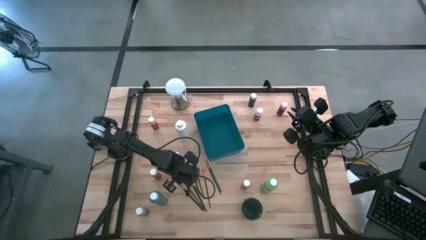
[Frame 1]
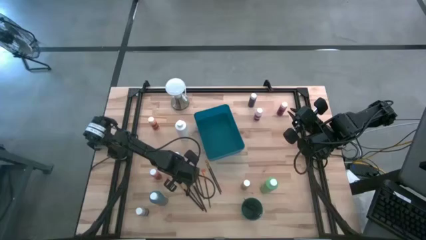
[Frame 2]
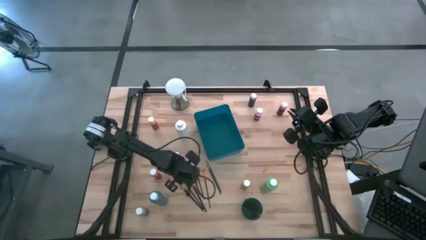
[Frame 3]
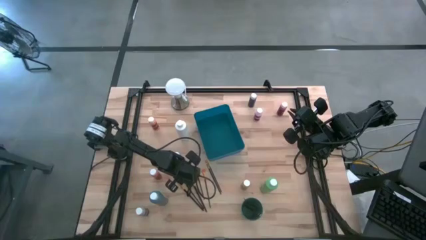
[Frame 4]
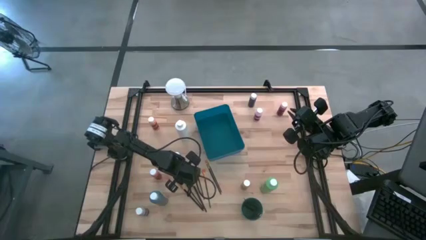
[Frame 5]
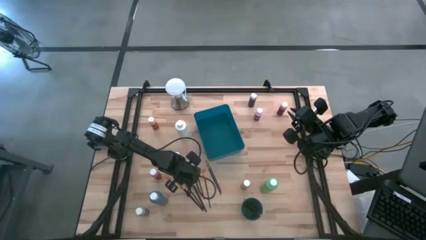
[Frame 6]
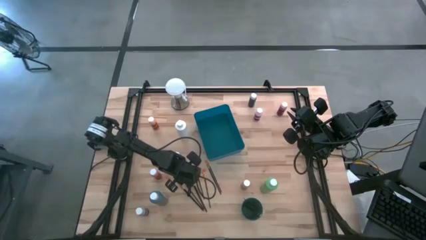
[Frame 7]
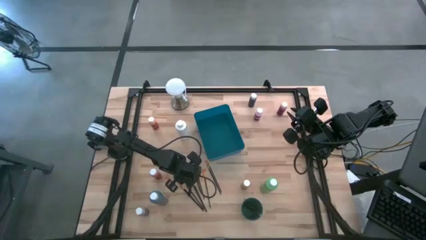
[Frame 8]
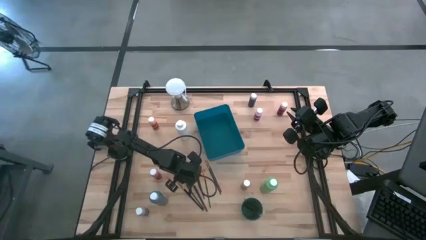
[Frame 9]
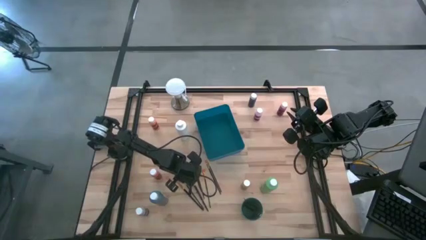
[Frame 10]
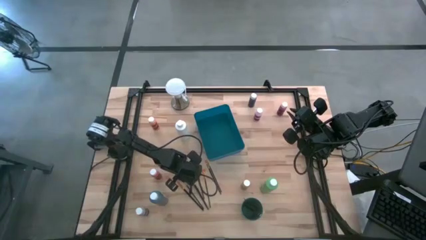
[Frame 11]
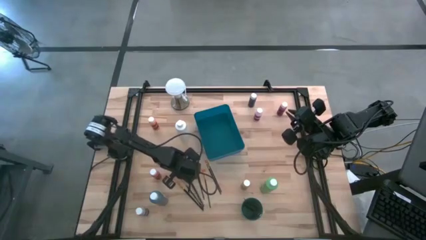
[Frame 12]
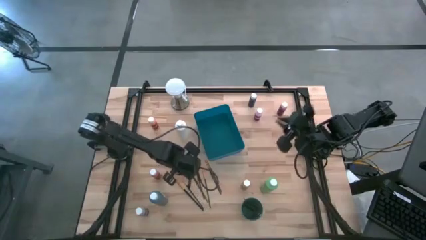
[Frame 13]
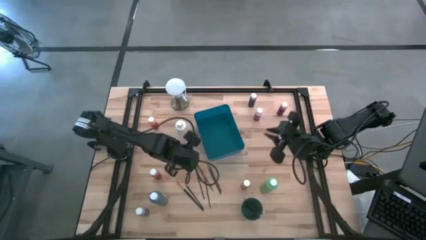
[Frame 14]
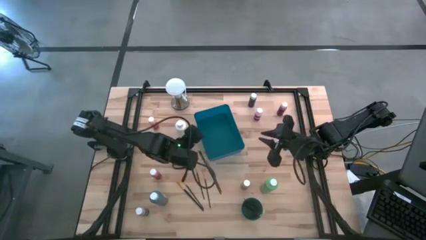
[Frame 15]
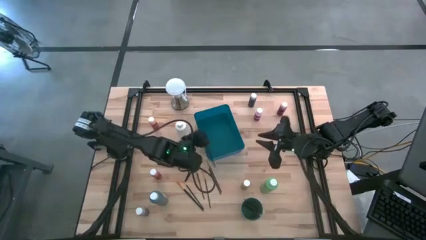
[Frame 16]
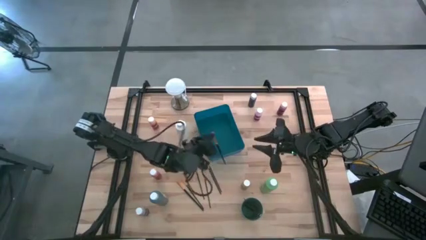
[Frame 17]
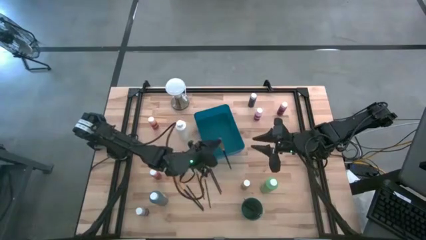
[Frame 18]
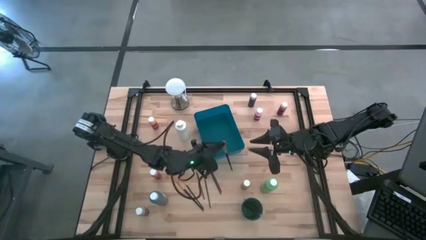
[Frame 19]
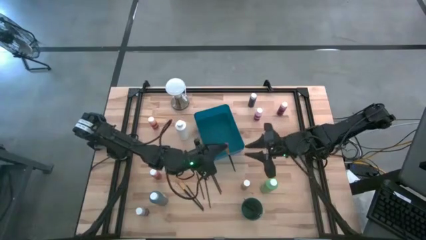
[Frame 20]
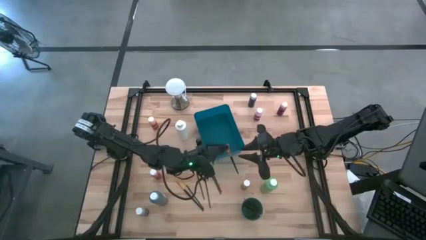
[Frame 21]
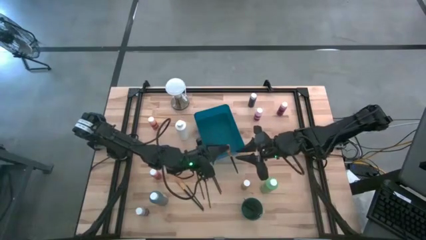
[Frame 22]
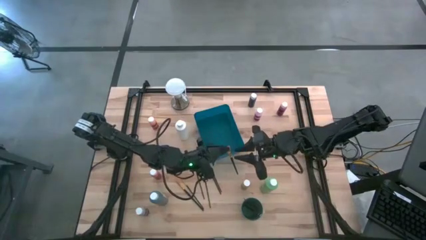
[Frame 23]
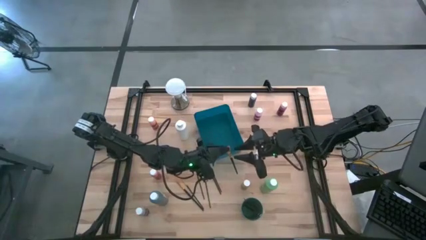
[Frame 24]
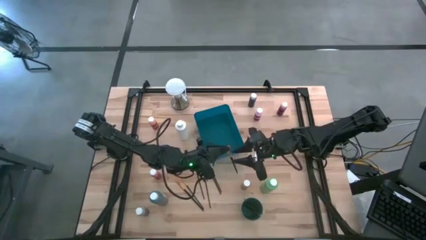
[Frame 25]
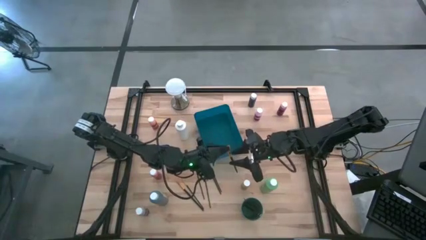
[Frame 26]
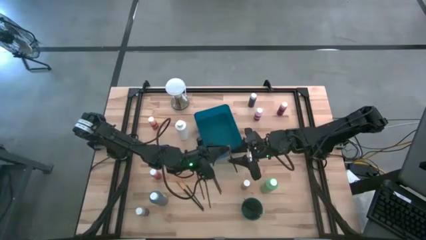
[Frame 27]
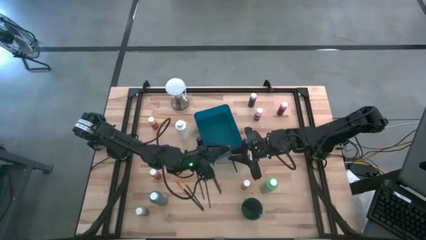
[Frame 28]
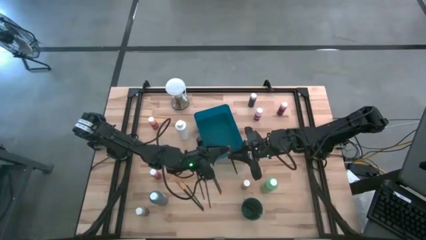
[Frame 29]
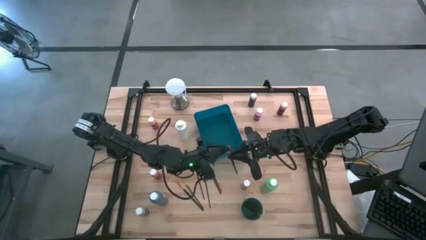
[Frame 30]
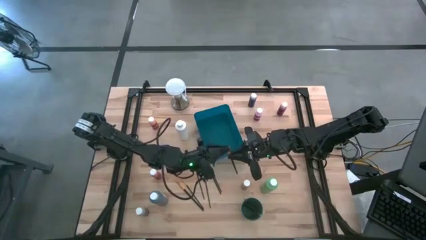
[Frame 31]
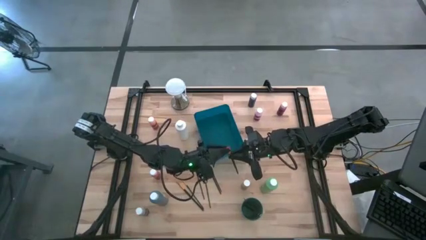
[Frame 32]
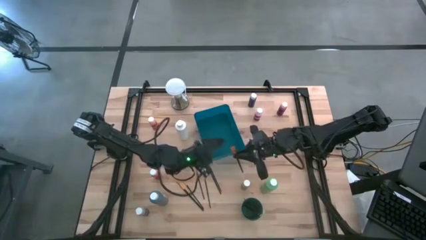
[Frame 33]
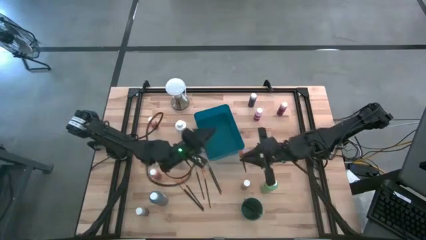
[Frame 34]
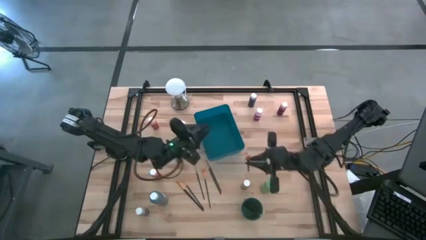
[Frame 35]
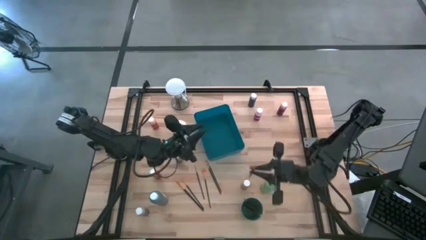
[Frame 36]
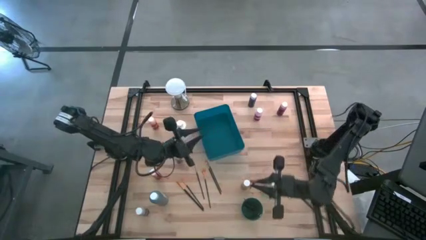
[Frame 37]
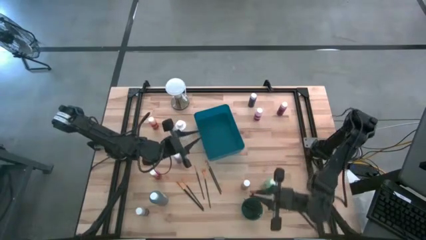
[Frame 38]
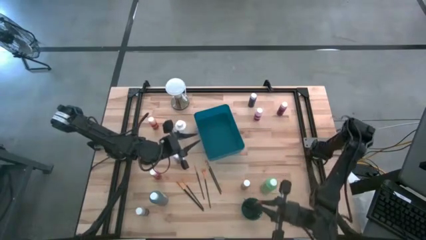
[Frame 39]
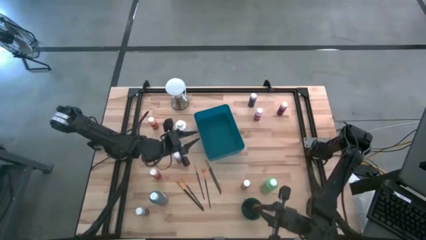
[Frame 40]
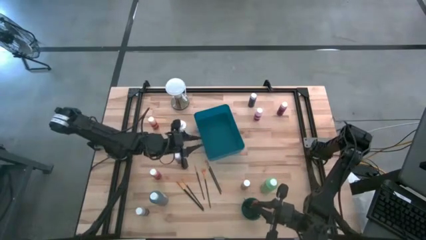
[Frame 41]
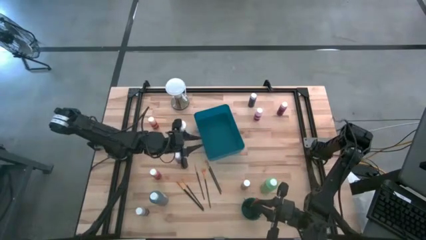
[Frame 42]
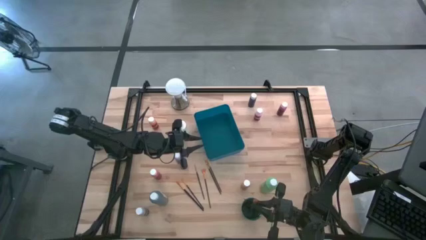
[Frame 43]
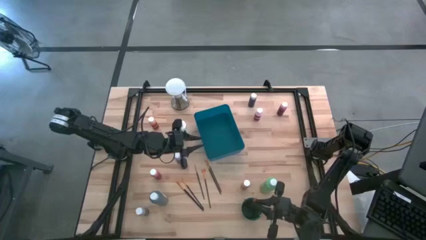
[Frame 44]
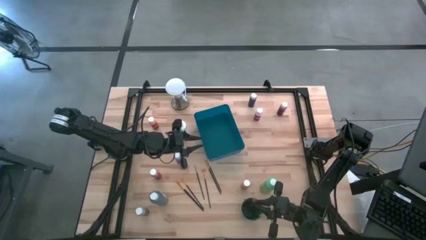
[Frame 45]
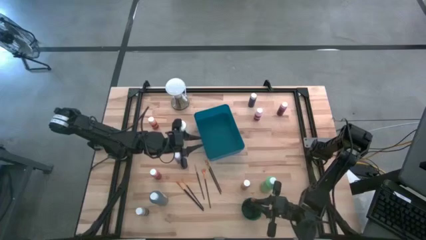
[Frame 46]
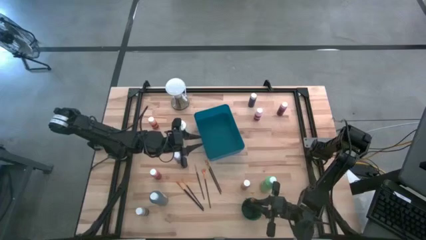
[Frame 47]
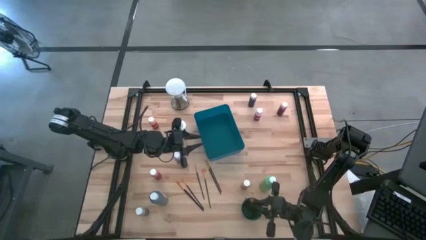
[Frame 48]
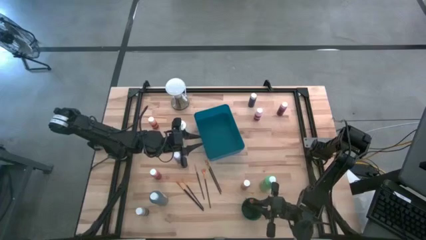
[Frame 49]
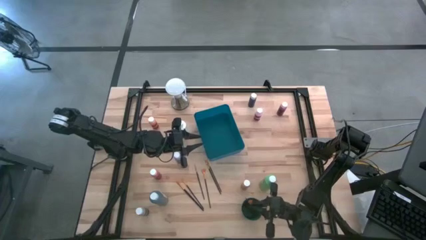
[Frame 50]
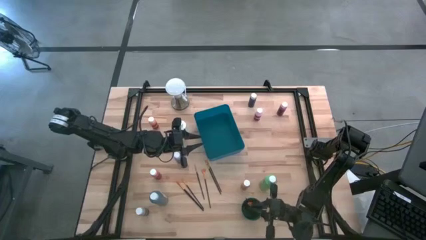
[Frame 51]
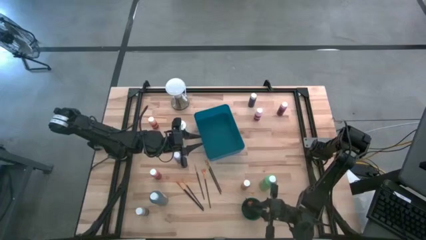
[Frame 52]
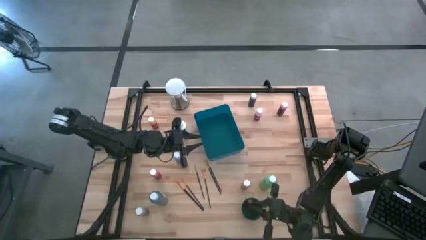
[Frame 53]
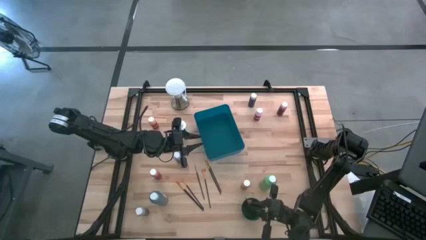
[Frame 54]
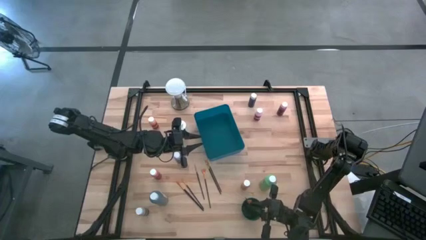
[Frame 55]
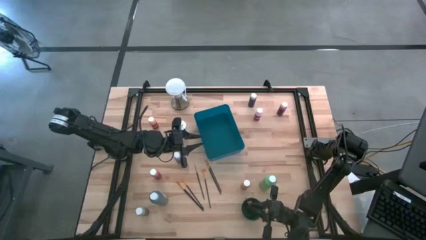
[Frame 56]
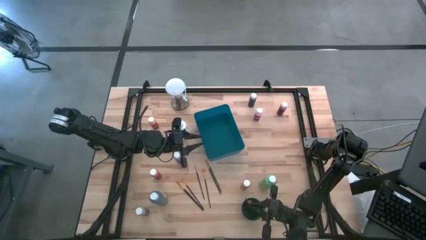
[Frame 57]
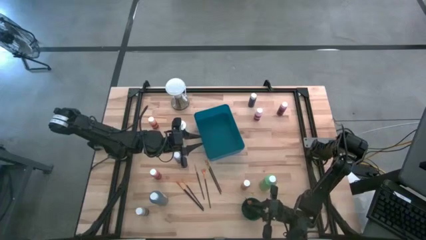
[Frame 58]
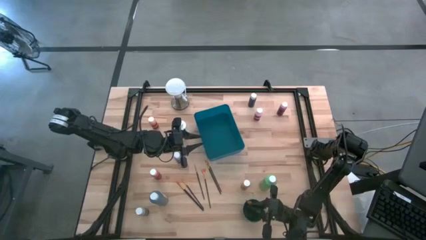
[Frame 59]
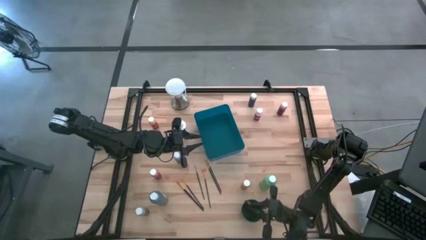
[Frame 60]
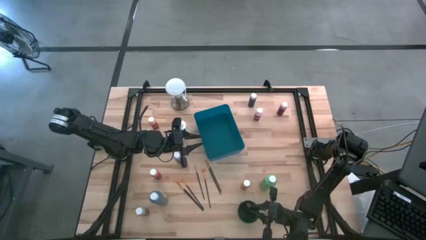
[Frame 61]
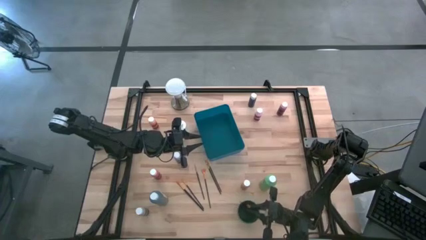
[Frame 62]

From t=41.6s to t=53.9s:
Task: Pick & Place Paint Supplies
Put the gold paint brush into the green cup
